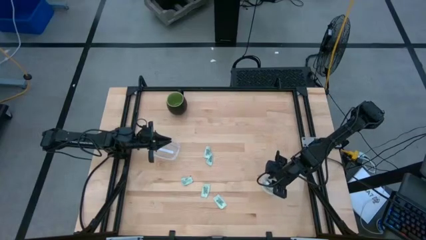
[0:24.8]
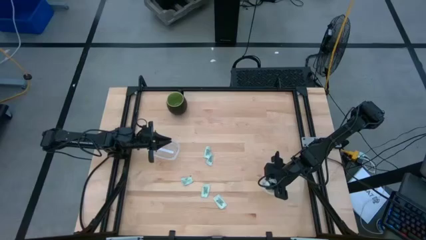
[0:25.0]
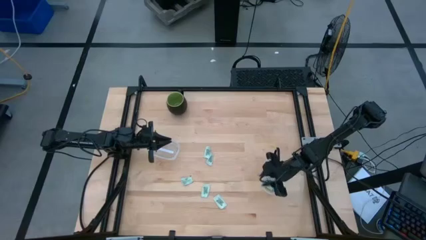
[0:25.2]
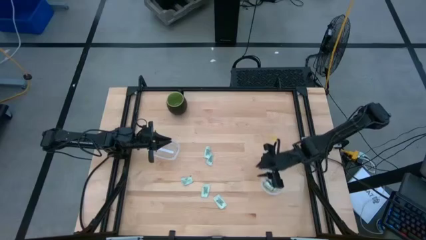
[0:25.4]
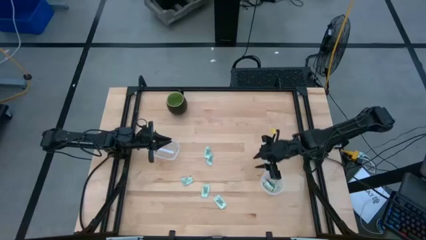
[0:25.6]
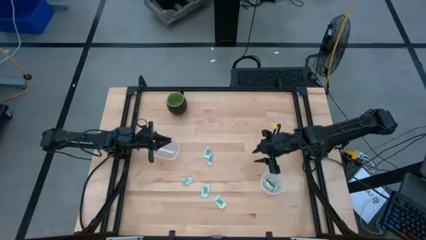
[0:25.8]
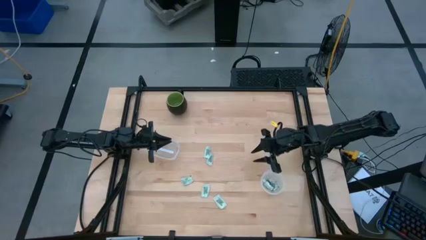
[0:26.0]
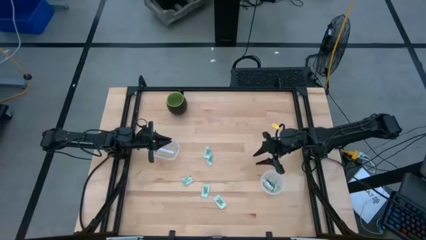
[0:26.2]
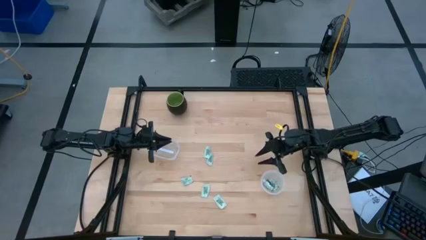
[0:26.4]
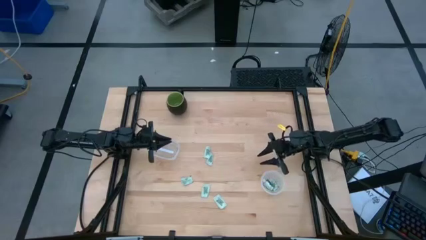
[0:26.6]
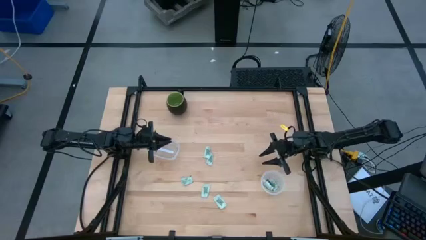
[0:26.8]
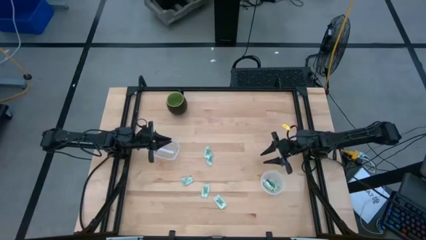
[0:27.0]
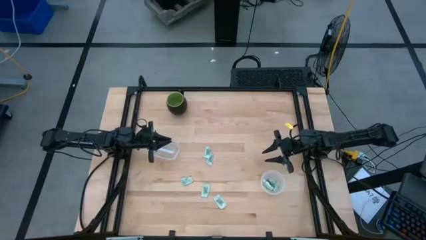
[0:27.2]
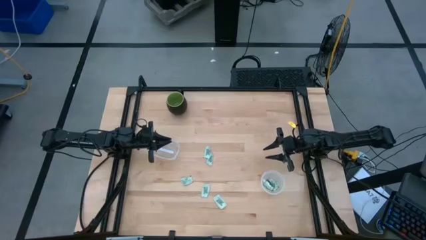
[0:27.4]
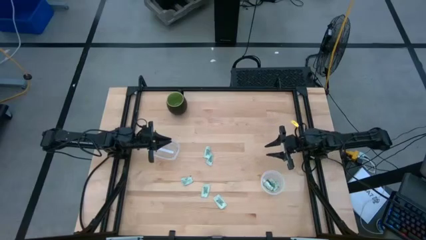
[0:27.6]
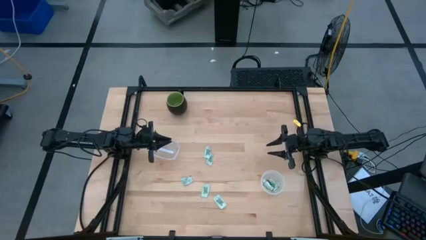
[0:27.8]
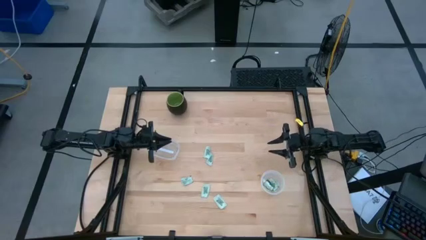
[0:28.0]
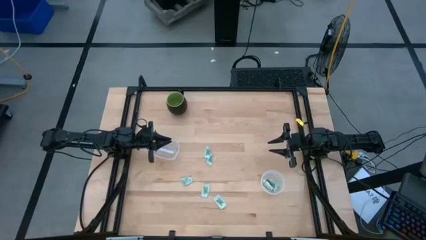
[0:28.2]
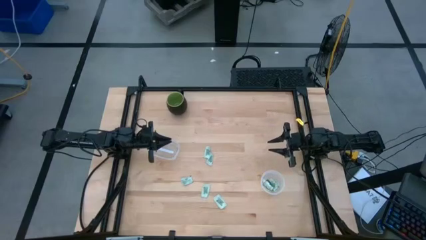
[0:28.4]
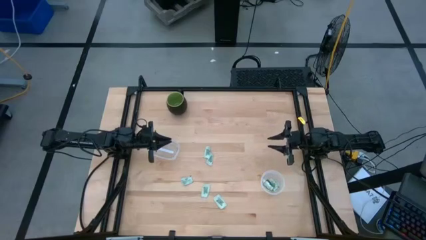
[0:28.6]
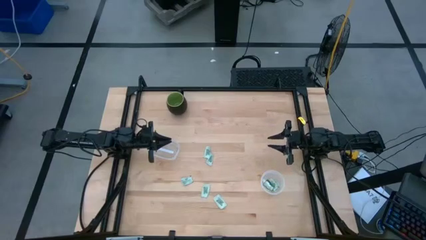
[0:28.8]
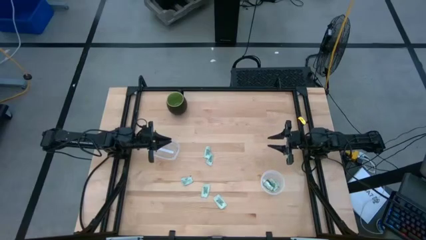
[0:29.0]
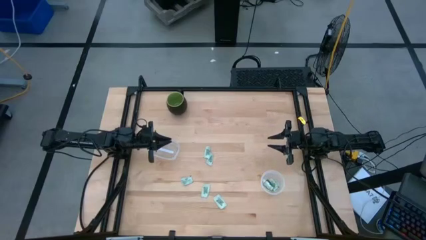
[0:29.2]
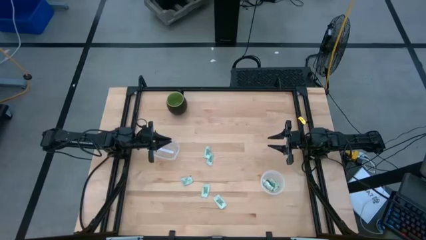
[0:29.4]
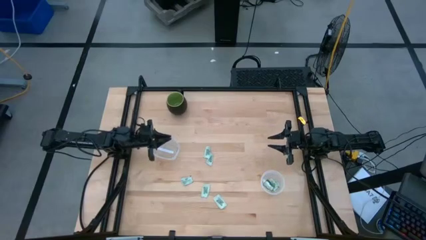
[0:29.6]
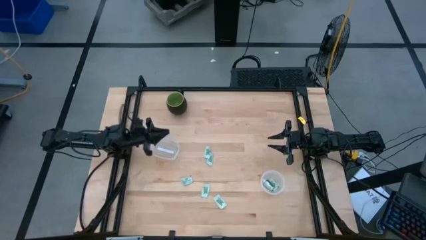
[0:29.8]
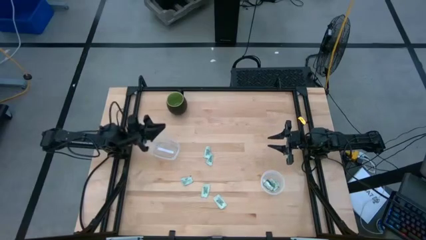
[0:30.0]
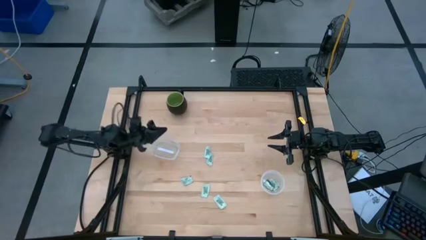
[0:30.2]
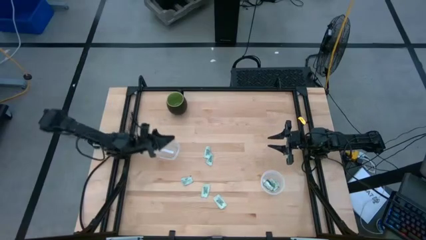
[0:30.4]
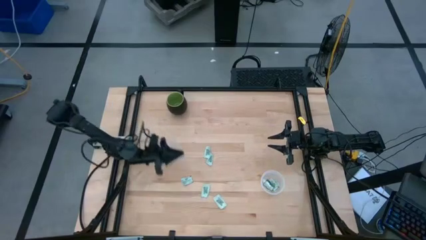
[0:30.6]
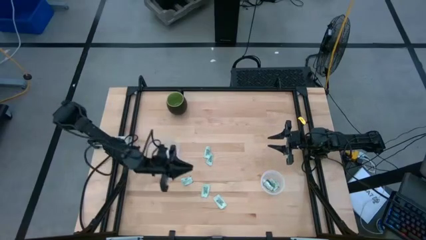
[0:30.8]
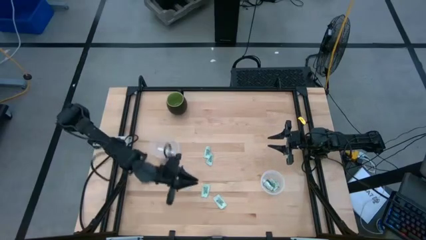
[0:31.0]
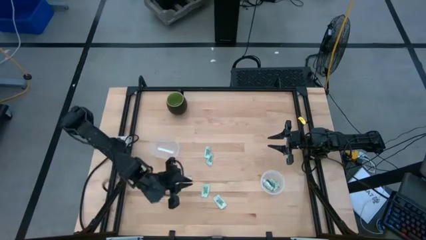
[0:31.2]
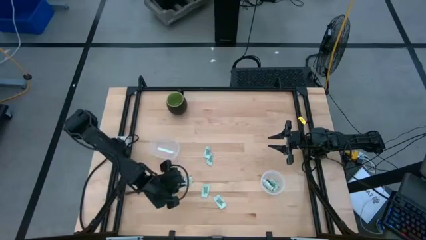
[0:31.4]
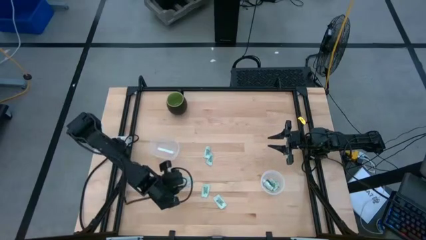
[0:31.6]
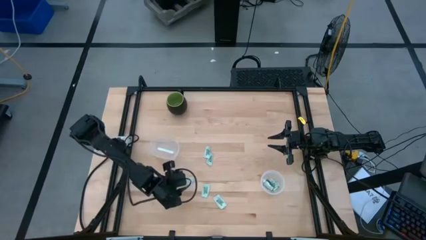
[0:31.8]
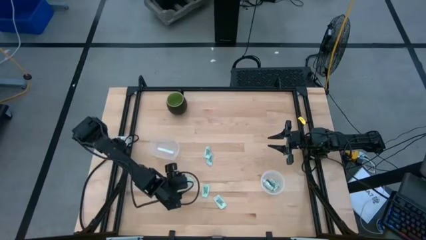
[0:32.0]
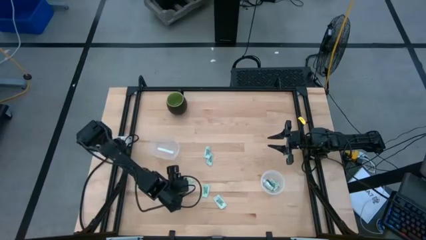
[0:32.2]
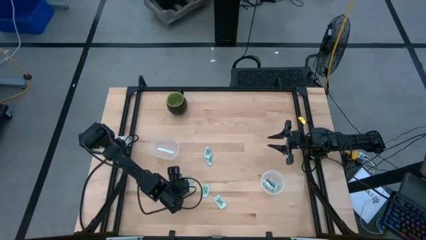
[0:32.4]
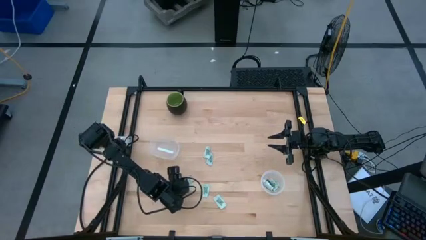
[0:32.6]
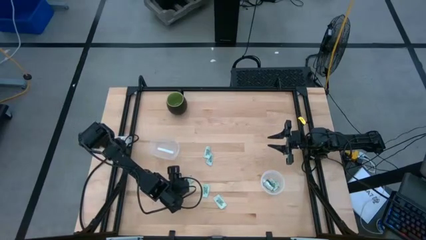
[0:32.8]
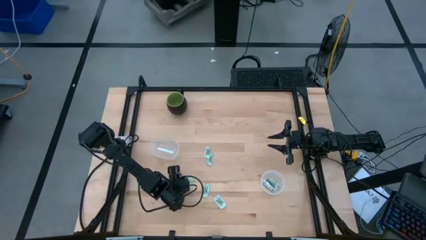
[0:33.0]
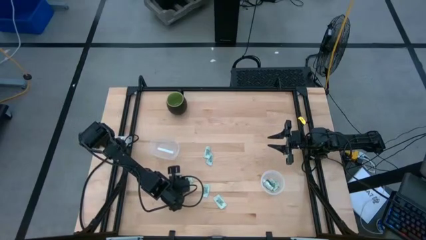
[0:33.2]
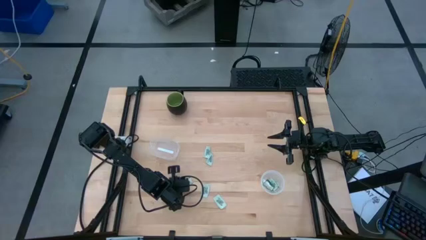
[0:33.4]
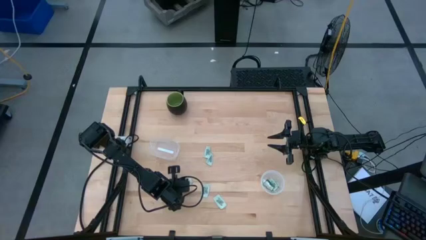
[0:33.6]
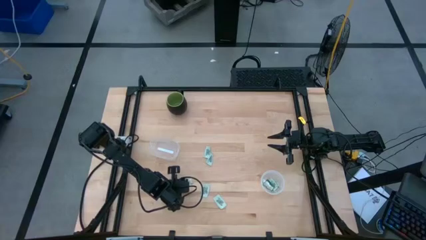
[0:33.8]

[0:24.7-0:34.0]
Task: Pick and place Stevia / Truvia into bins
Put the white stevia packet into the left transparent container

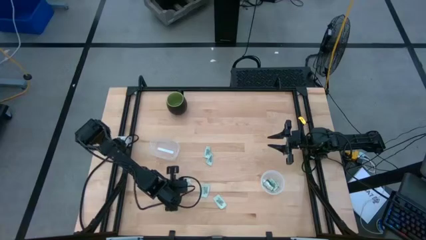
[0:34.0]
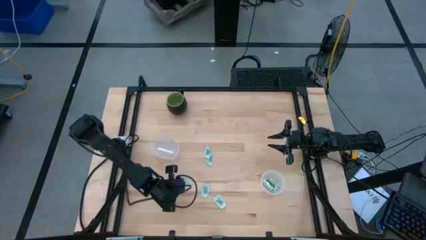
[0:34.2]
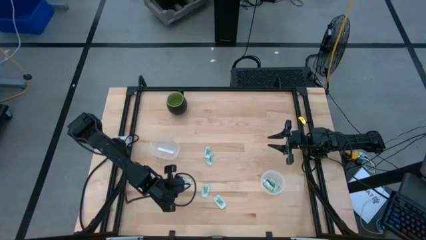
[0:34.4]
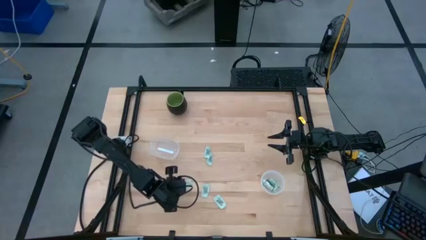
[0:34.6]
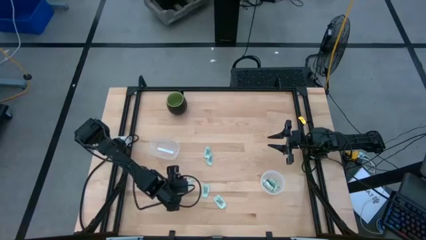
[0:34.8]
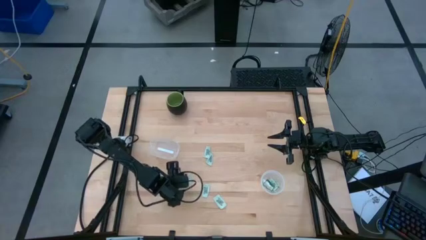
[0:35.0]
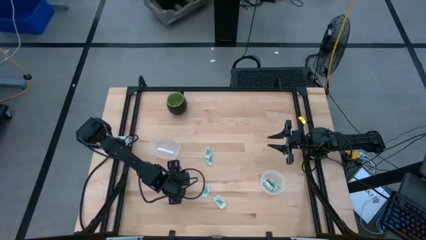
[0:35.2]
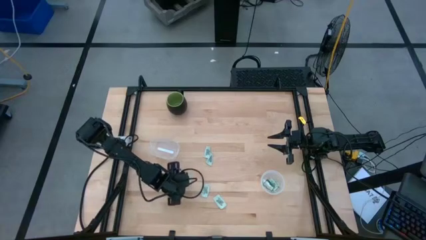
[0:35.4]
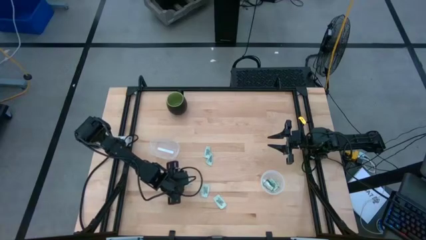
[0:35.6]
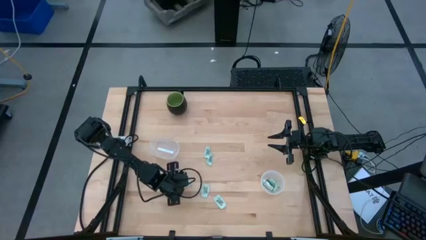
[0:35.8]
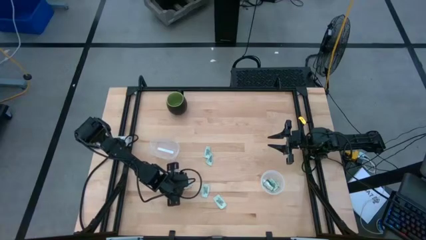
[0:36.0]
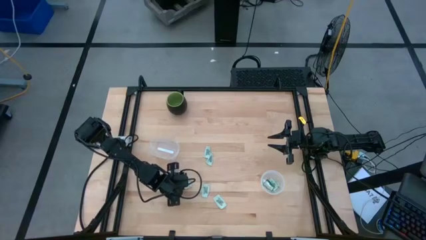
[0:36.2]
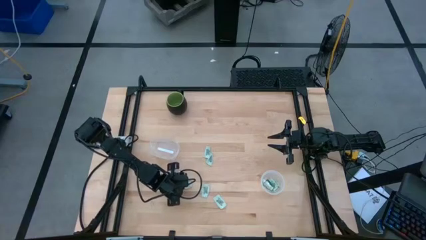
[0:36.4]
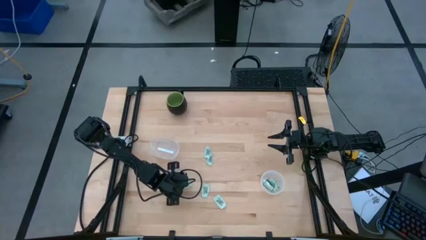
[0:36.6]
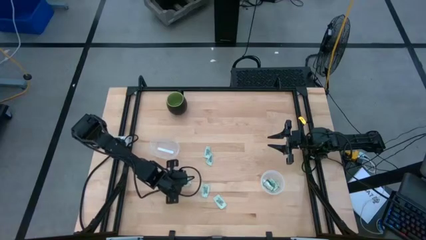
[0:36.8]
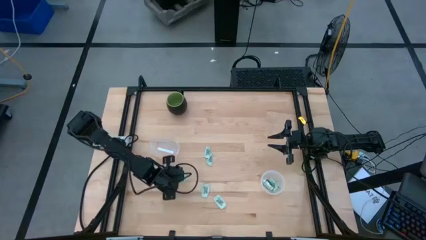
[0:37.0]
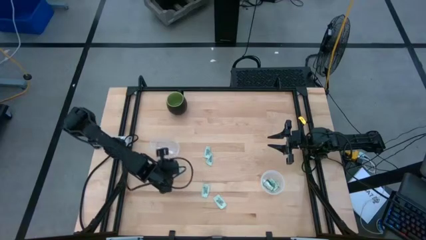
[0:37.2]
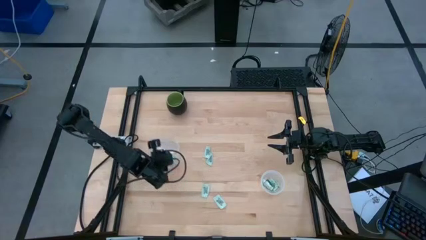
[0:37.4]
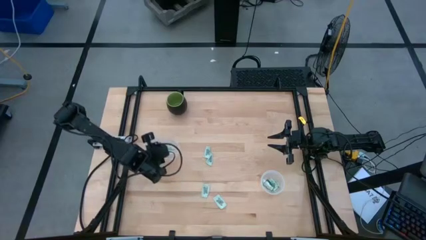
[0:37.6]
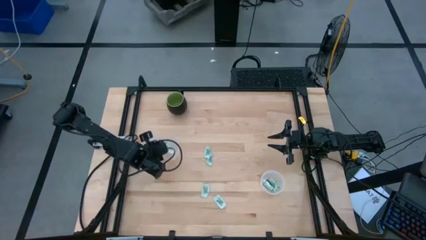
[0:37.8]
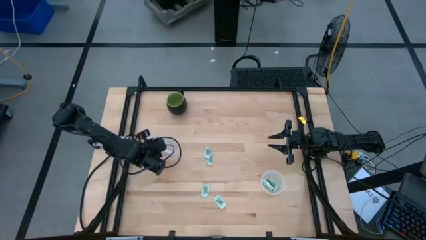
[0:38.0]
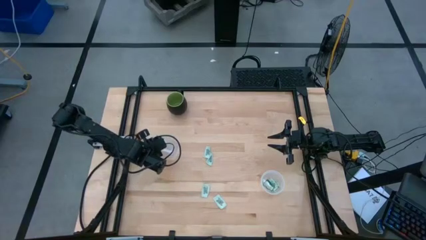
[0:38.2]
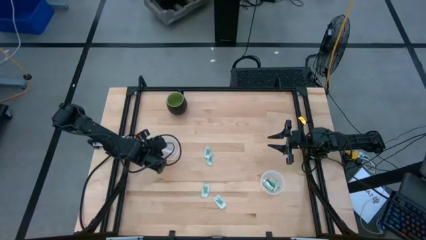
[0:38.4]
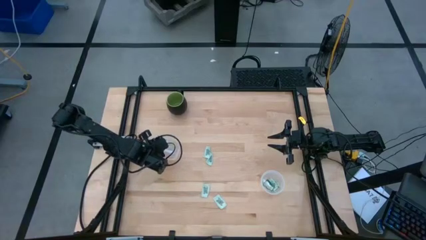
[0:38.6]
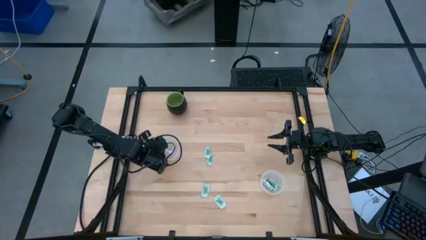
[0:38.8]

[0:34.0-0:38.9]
Put the white stevia packet into the left transparent container

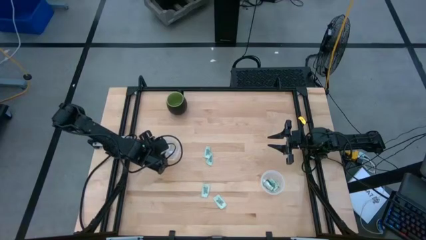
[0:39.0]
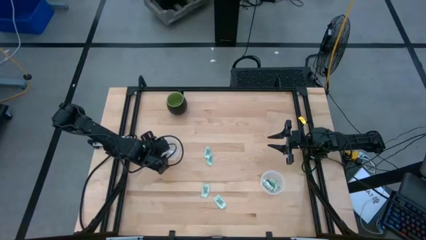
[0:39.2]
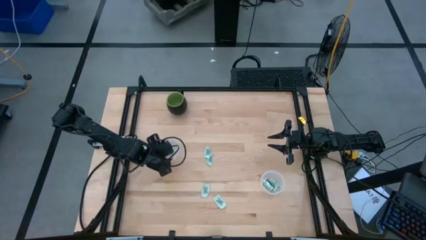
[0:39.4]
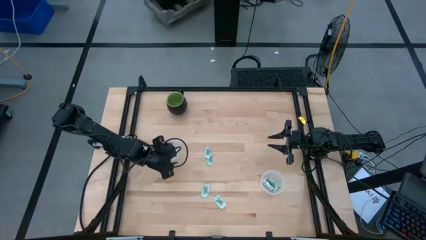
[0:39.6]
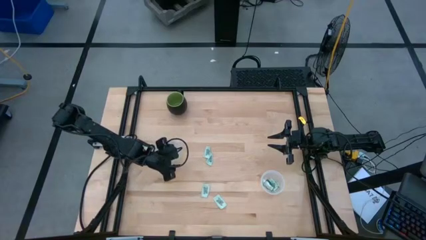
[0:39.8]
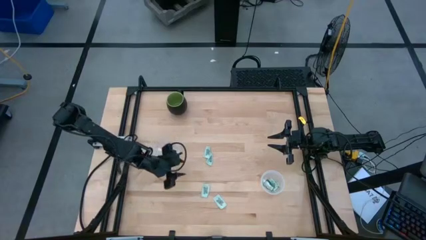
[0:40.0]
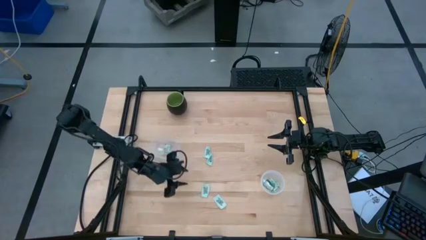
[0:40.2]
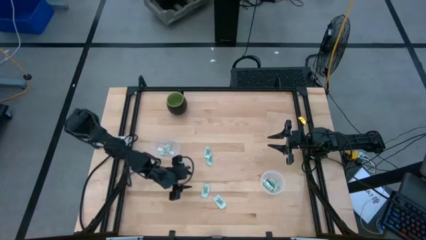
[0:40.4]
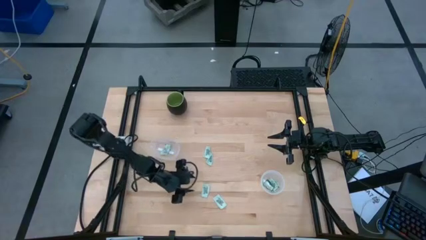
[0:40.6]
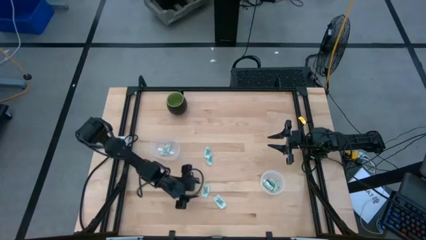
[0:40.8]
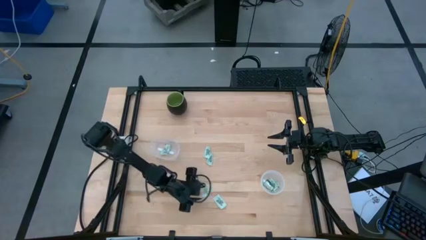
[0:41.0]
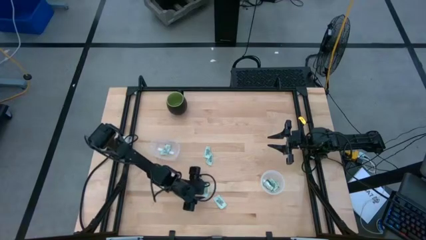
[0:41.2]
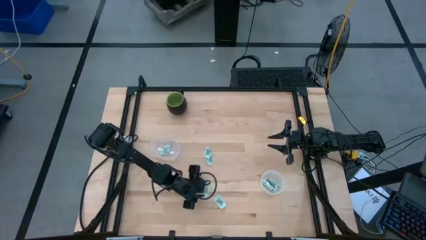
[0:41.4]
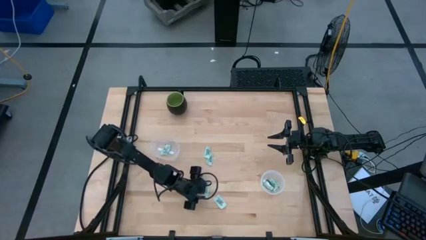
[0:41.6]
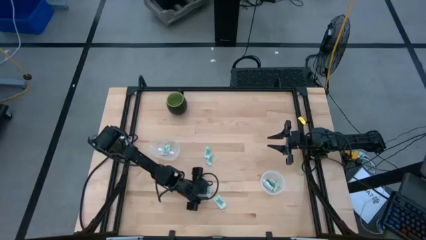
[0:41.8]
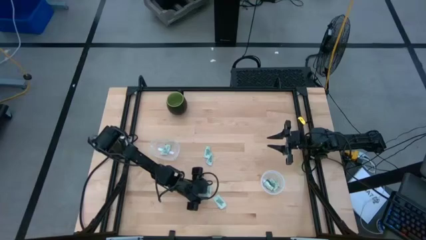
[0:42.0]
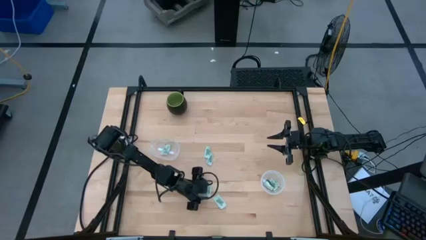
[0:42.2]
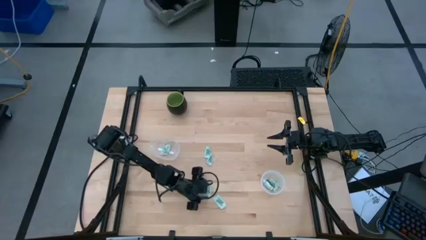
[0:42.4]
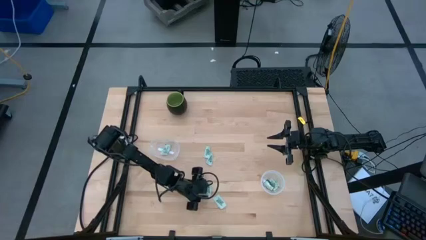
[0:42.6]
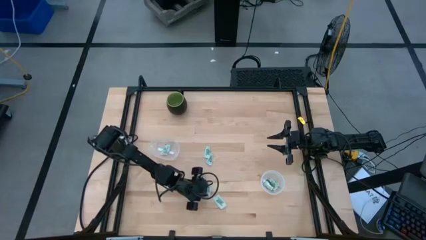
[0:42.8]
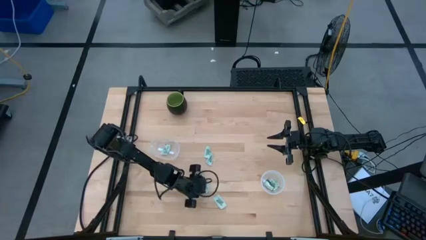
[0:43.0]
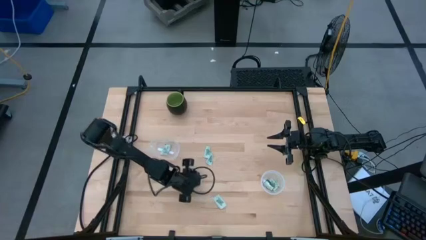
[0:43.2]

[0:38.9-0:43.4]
Put the white stevia packet into the left transparent container
